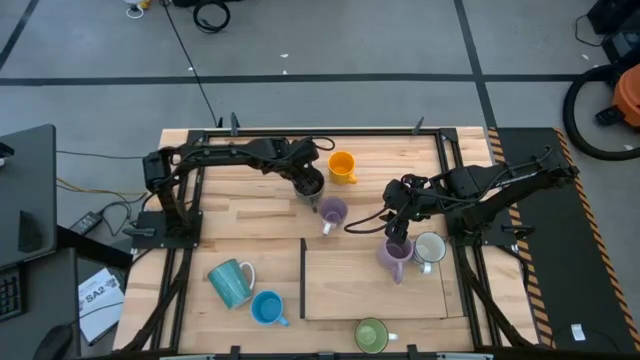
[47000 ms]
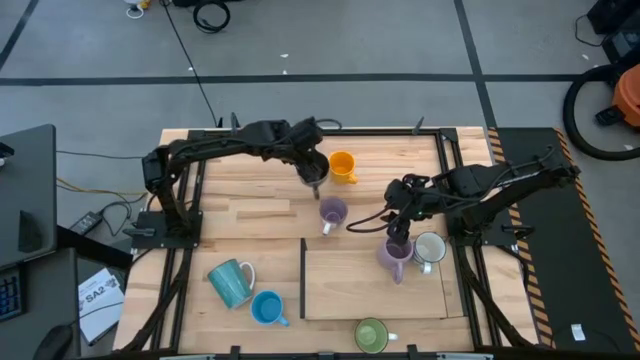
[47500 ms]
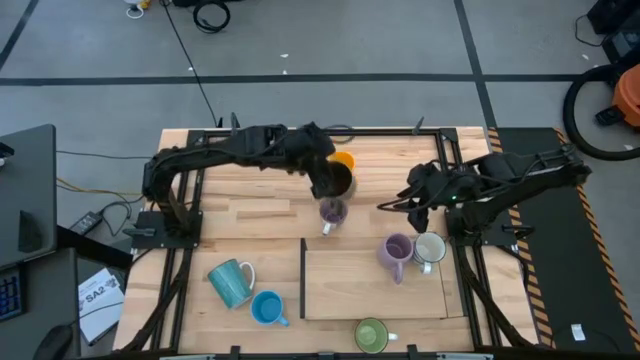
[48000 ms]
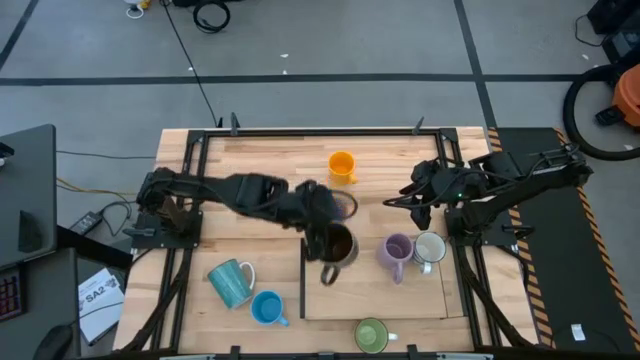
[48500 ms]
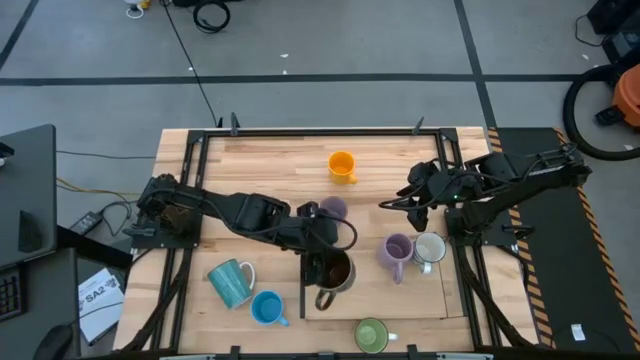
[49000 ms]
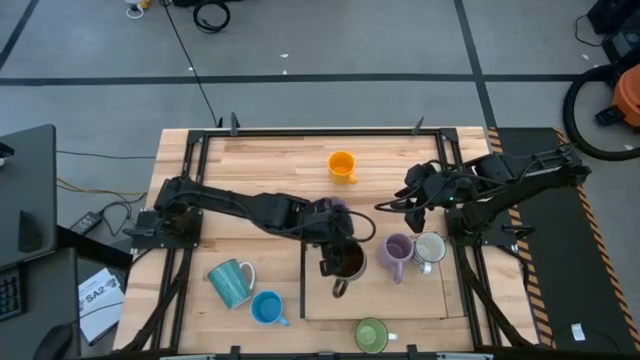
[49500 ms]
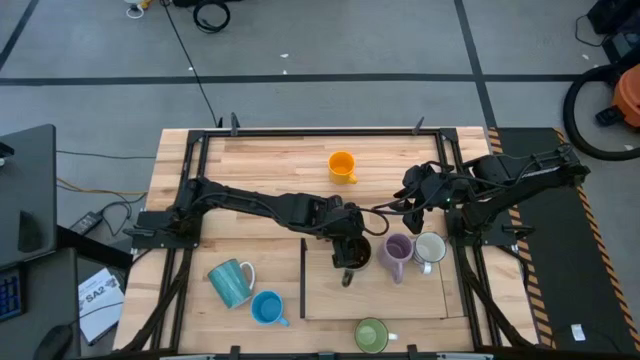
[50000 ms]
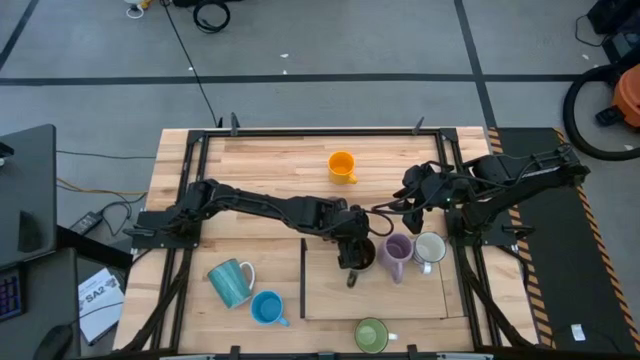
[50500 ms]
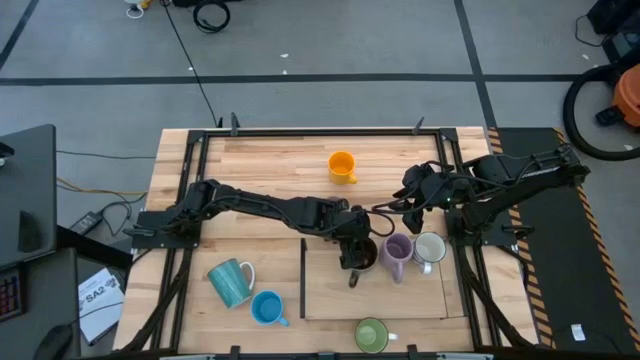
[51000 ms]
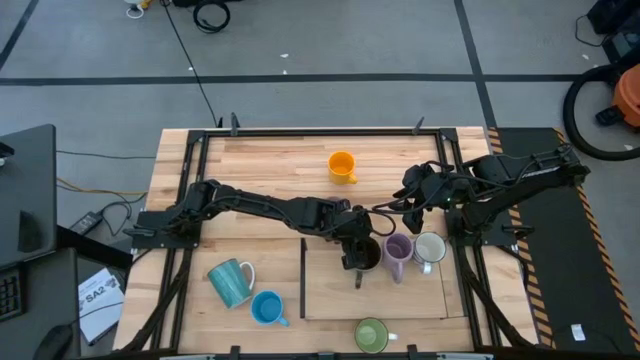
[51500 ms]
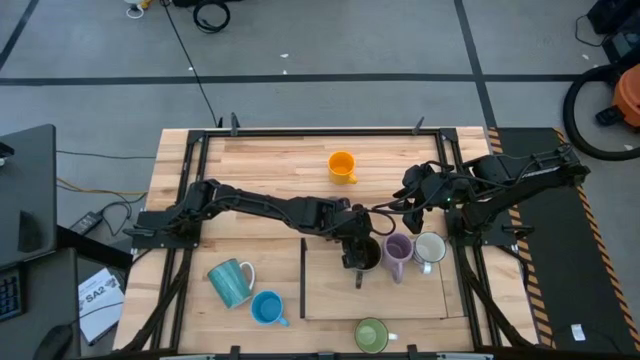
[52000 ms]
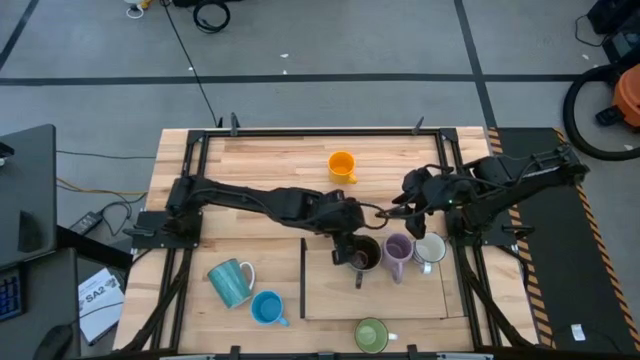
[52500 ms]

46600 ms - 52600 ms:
Task: Place coffee mugs
Put the blue mug on the shelf

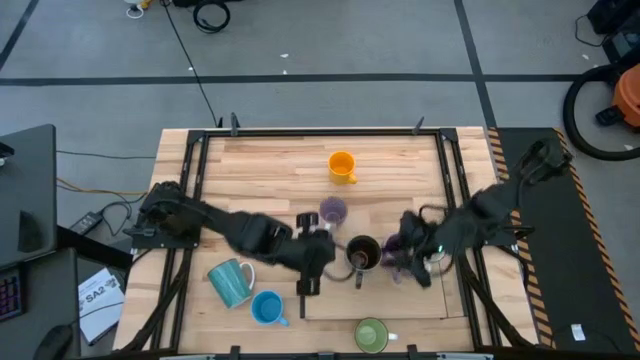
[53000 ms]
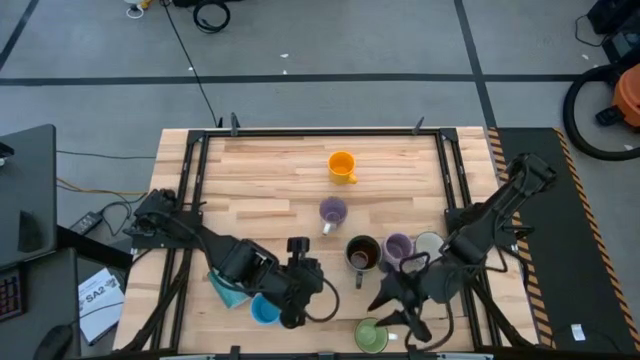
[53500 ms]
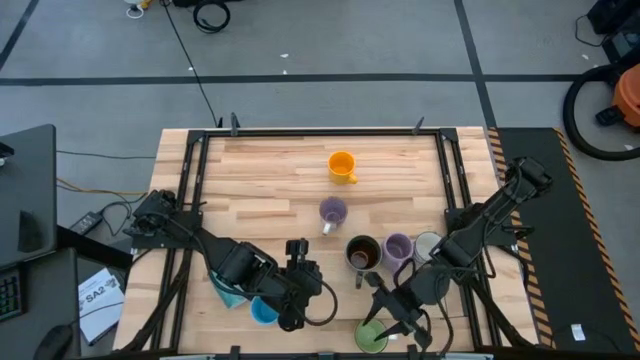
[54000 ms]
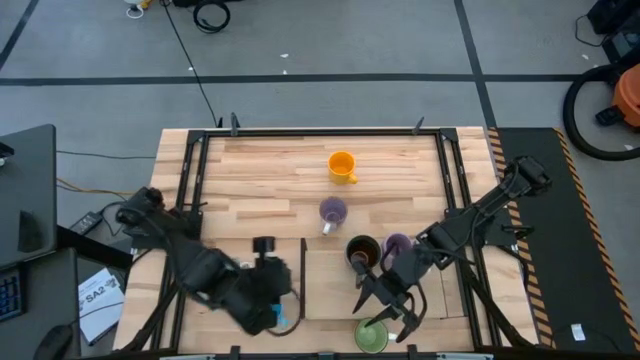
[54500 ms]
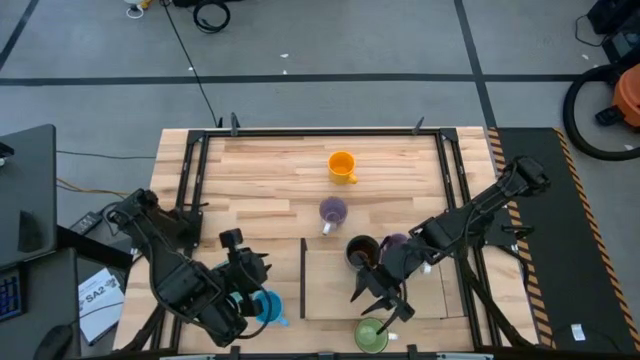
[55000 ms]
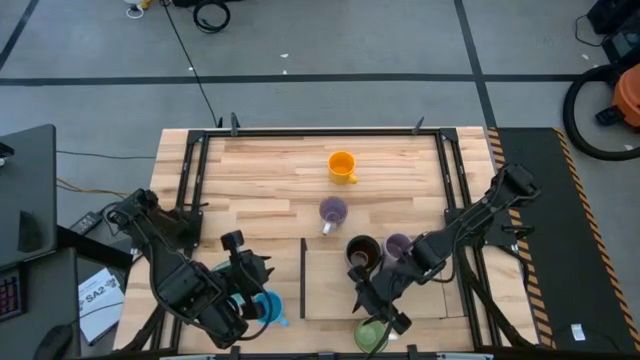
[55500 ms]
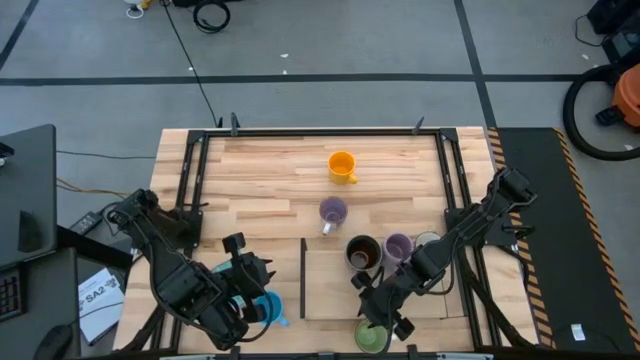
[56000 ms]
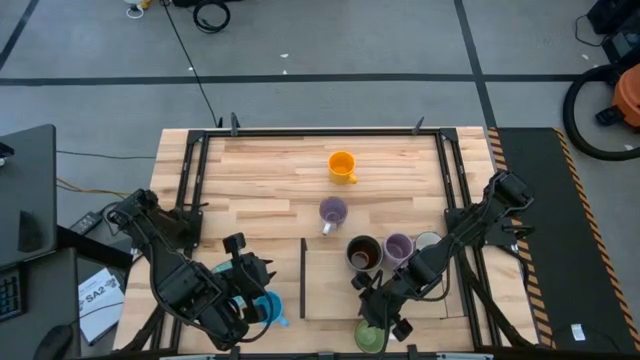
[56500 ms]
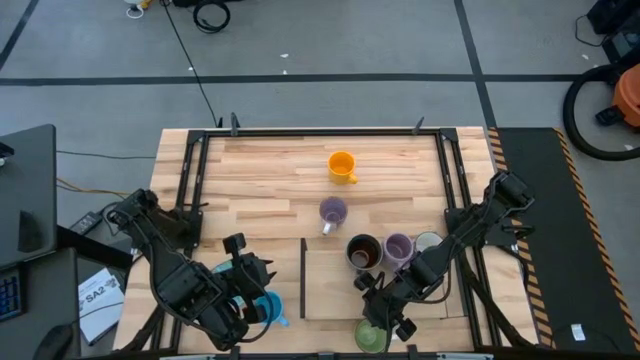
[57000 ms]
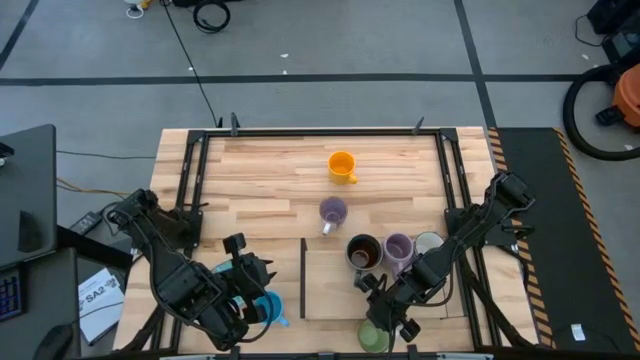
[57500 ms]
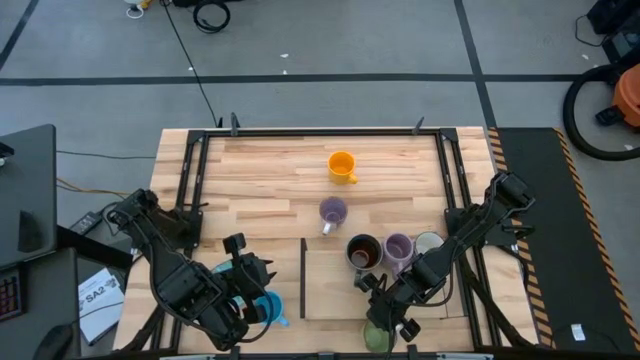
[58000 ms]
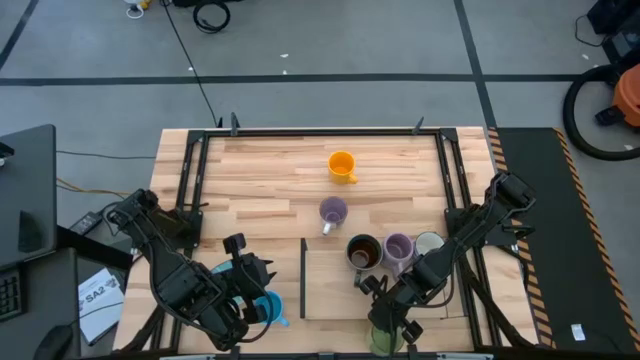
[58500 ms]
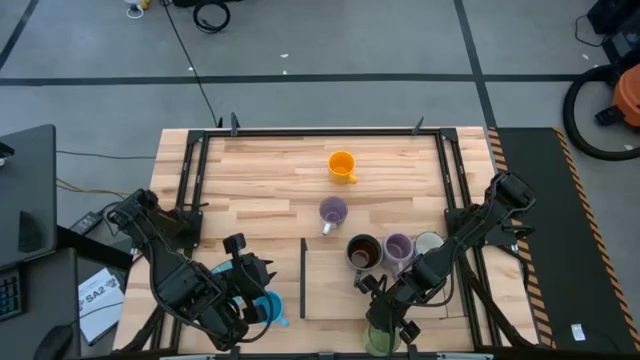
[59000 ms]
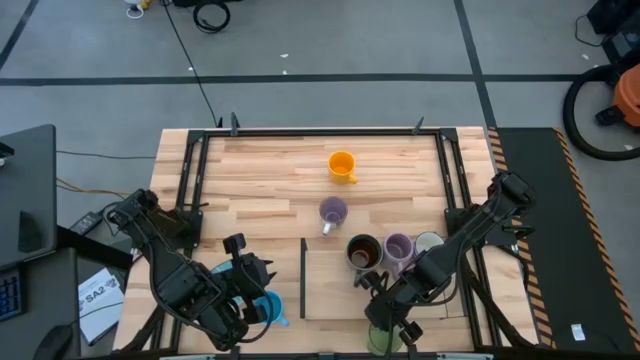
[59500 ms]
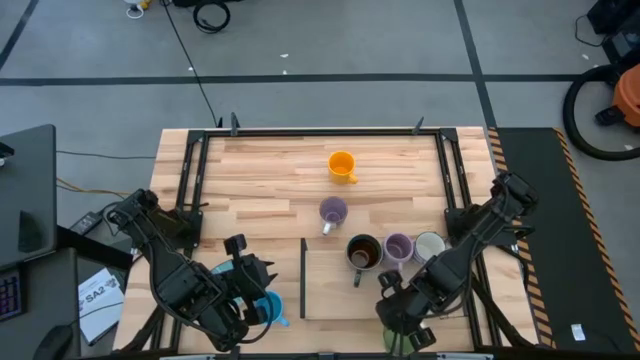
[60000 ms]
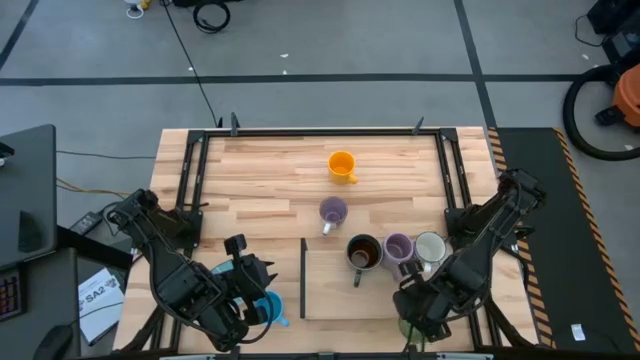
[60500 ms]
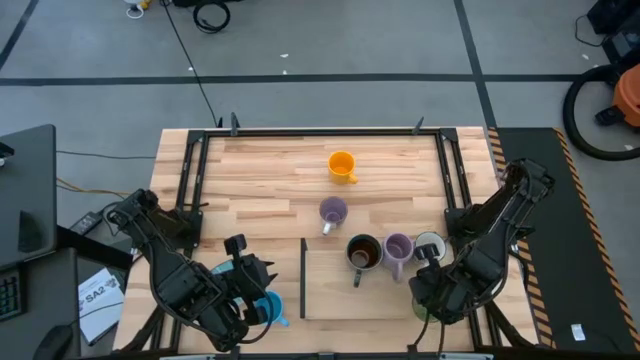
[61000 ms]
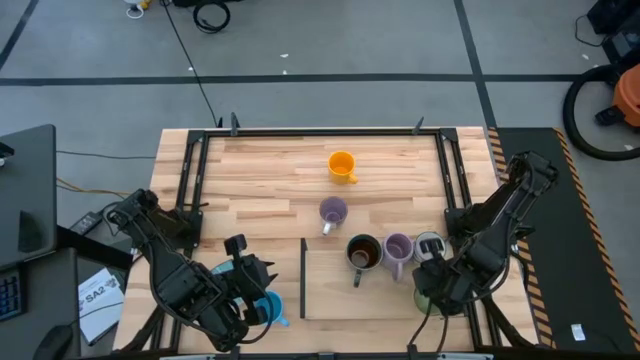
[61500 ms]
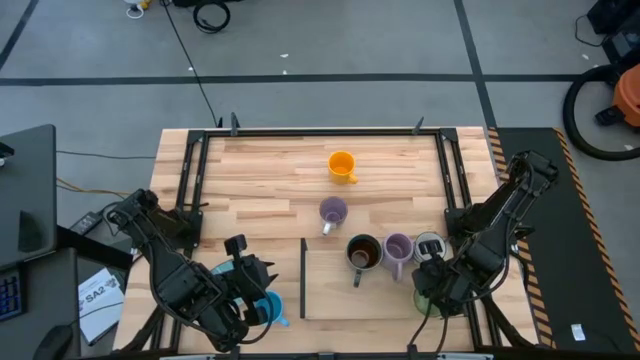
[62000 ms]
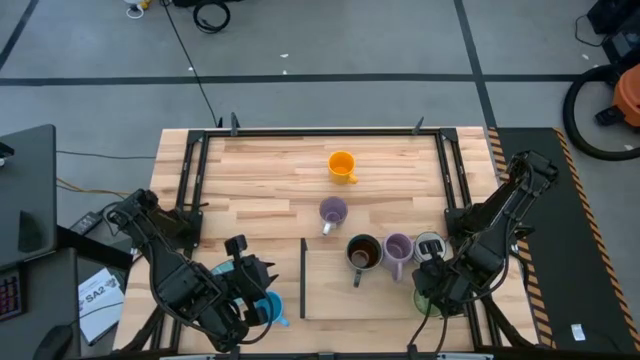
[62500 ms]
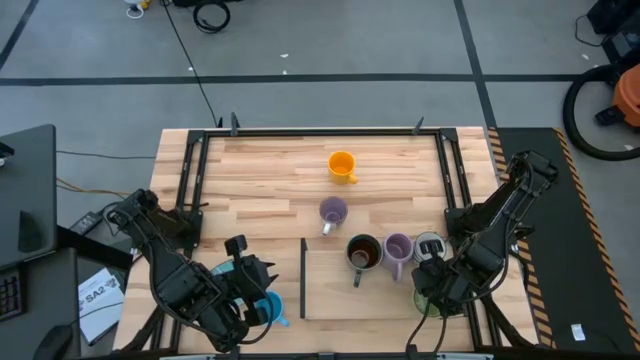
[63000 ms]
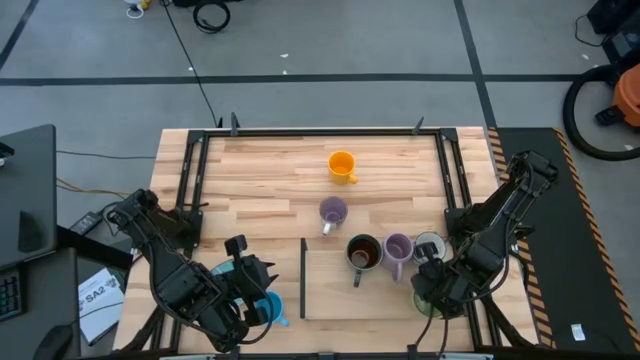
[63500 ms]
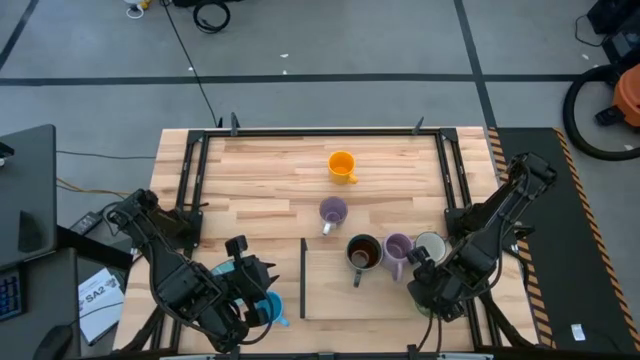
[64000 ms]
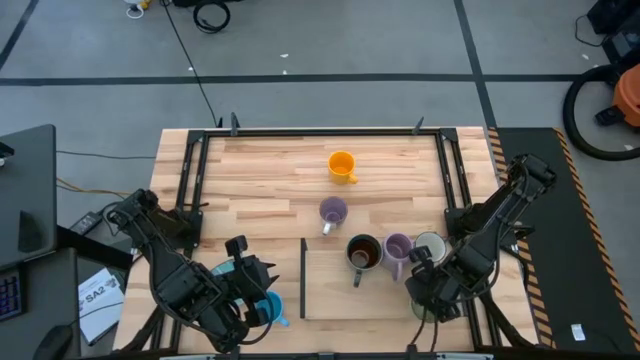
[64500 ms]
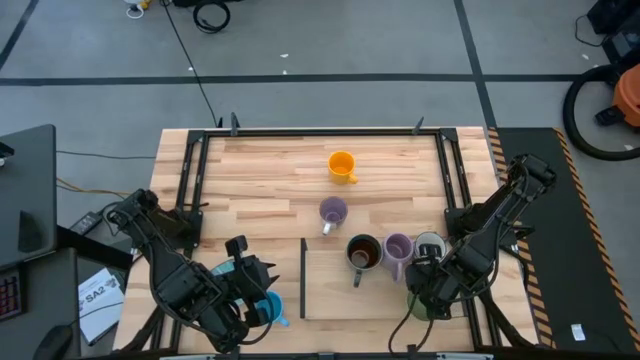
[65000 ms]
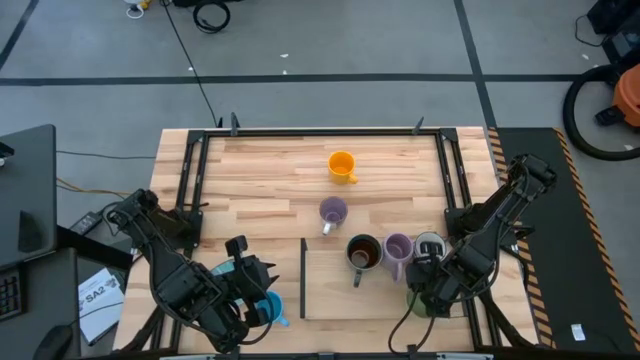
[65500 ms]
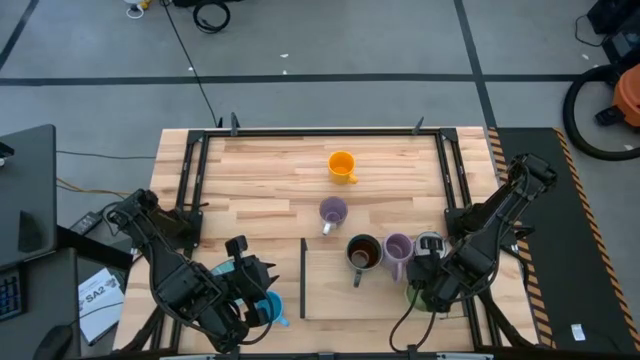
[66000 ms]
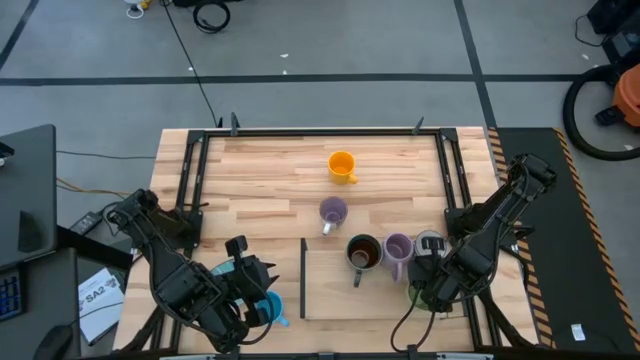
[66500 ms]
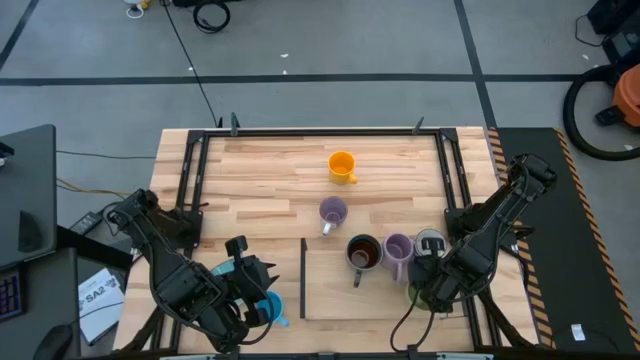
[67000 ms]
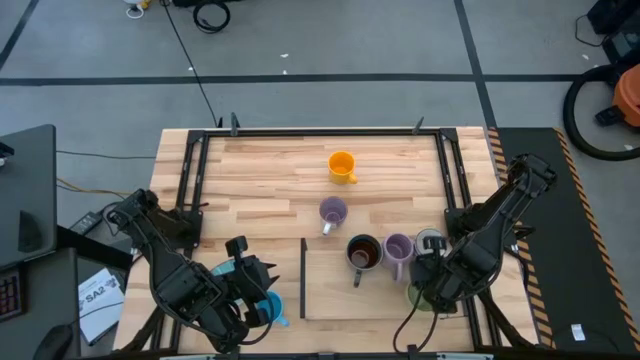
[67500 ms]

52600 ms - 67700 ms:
Put the green mug on the shelf aligned with the white mug

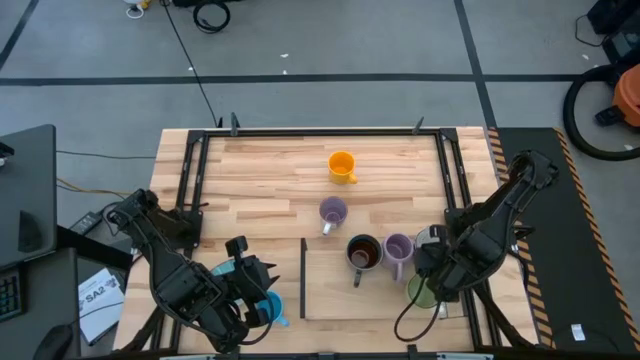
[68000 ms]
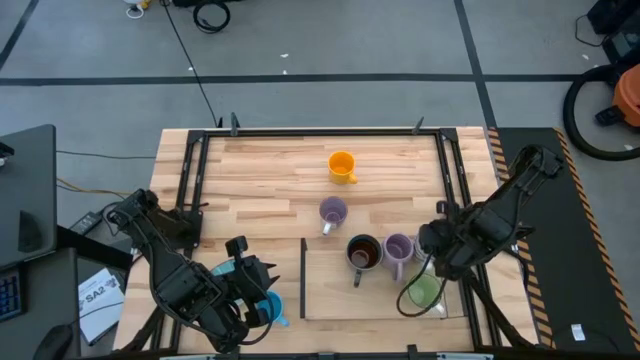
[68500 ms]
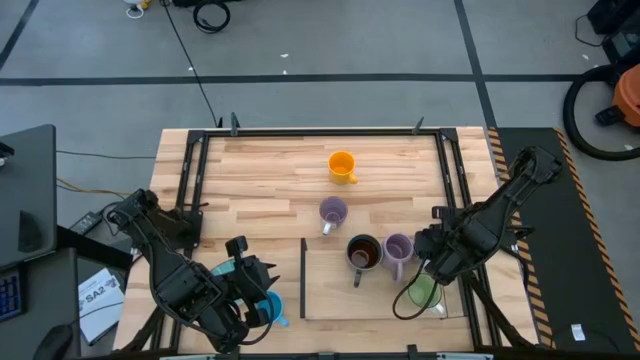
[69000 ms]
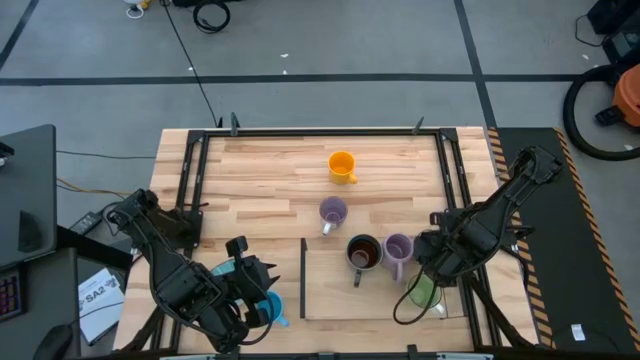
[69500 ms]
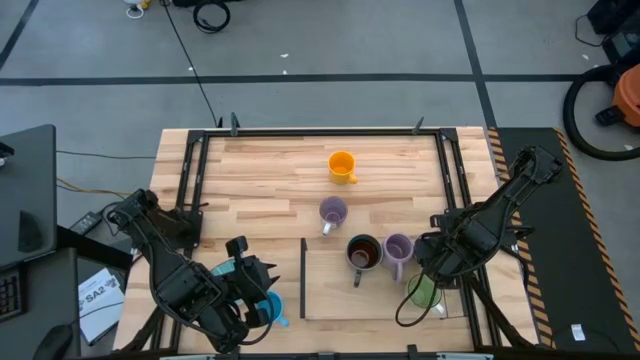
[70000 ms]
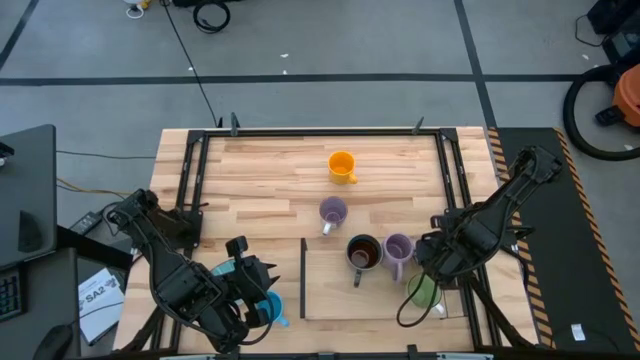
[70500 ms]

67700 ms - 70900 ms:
Adjust the white mug
